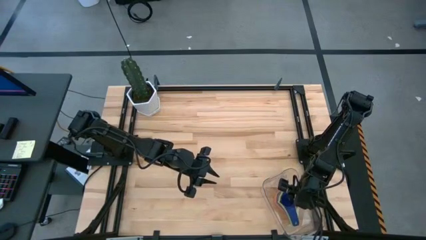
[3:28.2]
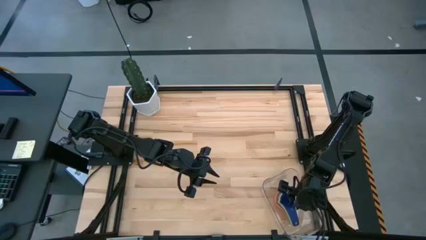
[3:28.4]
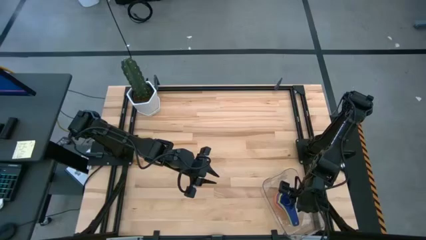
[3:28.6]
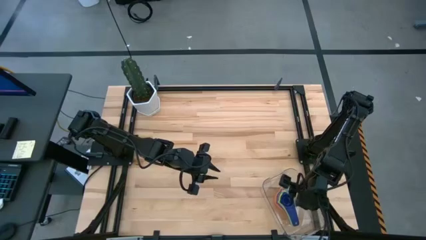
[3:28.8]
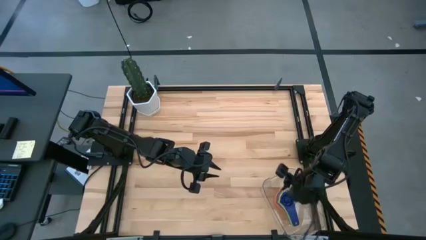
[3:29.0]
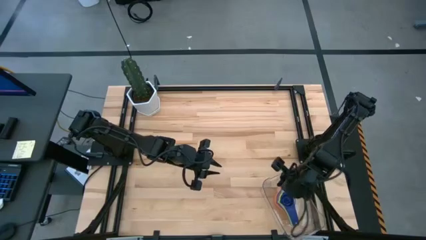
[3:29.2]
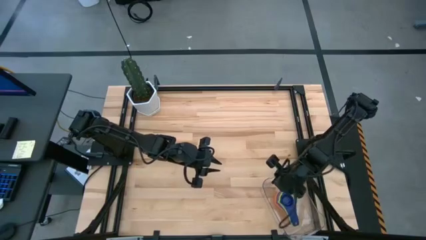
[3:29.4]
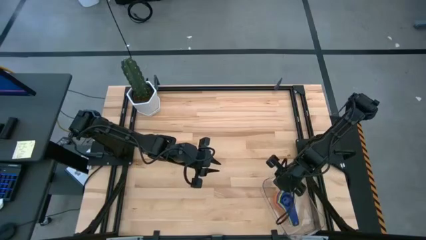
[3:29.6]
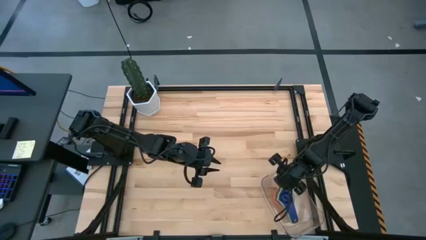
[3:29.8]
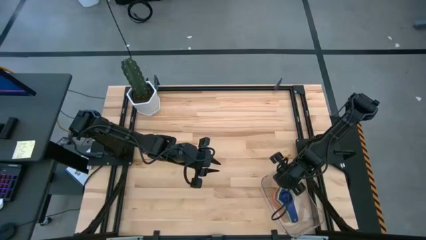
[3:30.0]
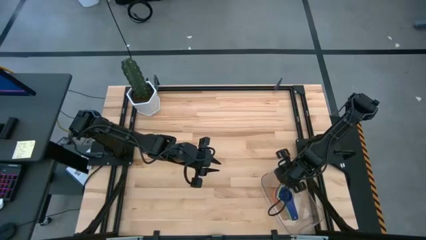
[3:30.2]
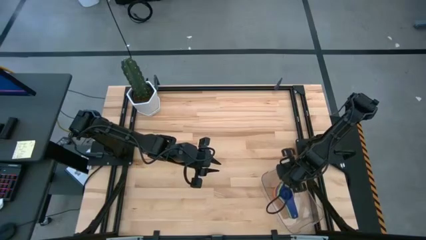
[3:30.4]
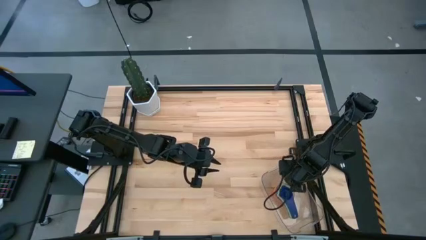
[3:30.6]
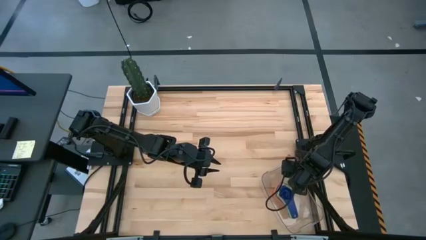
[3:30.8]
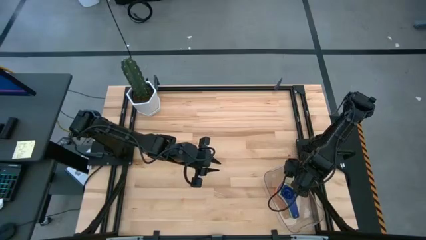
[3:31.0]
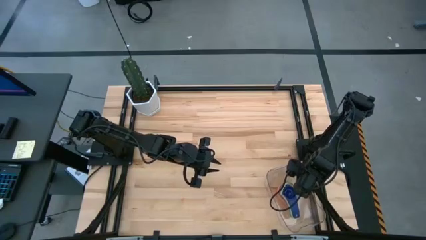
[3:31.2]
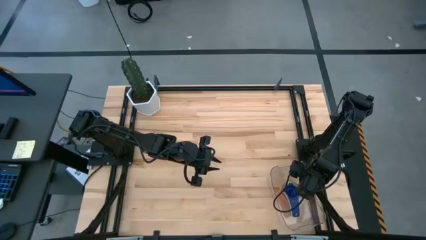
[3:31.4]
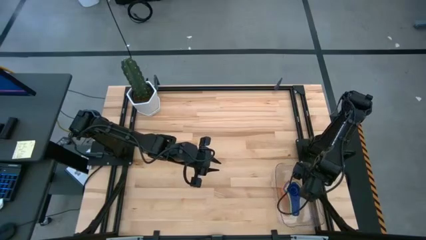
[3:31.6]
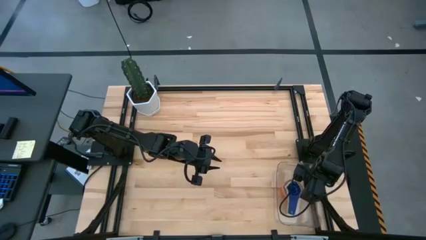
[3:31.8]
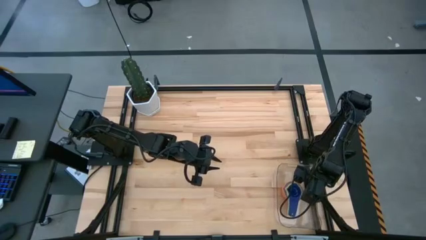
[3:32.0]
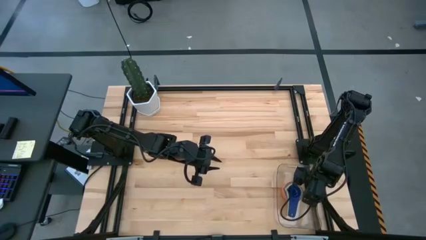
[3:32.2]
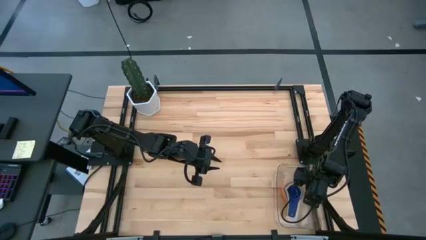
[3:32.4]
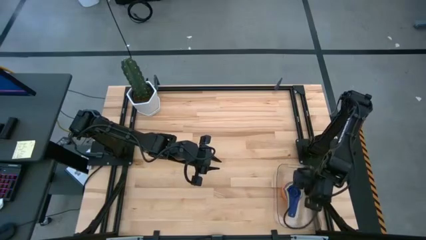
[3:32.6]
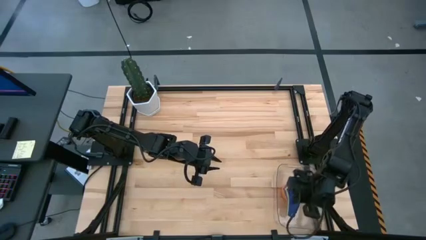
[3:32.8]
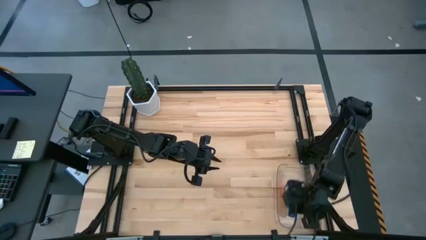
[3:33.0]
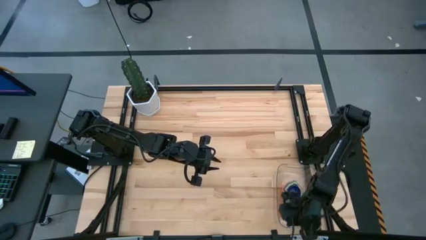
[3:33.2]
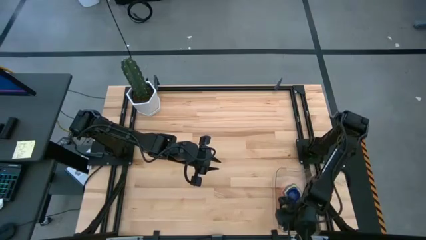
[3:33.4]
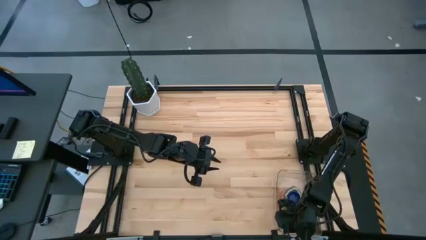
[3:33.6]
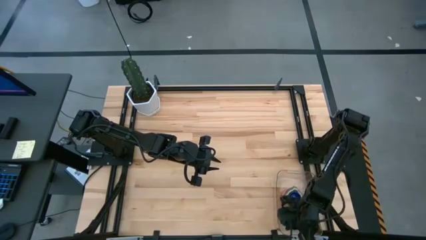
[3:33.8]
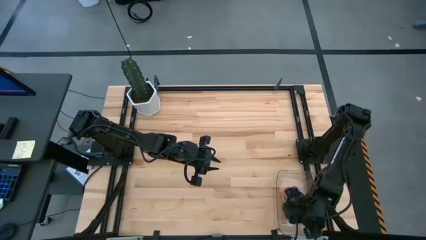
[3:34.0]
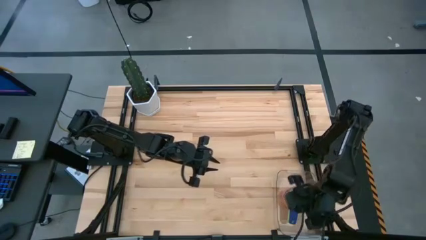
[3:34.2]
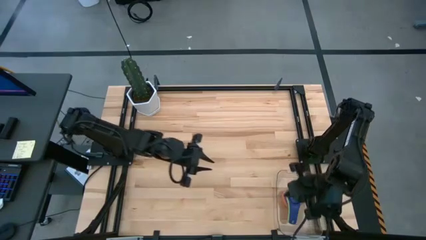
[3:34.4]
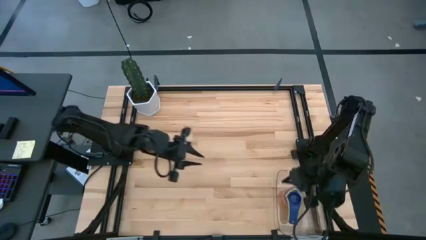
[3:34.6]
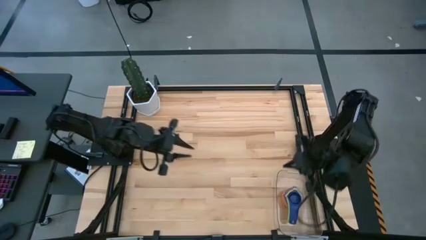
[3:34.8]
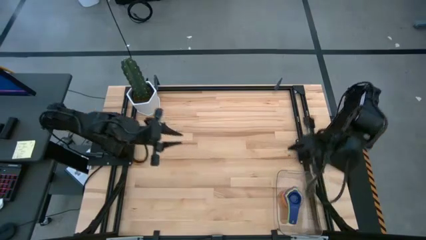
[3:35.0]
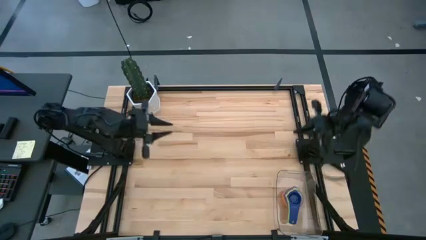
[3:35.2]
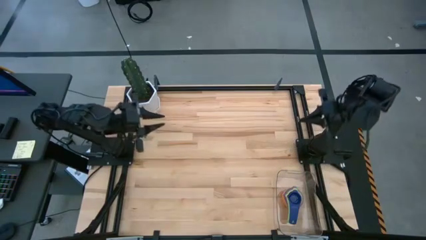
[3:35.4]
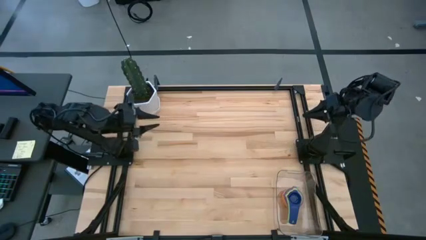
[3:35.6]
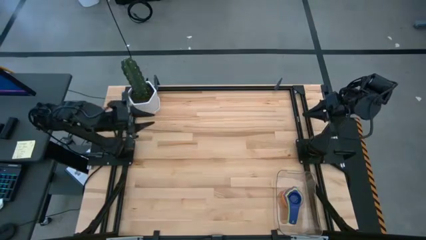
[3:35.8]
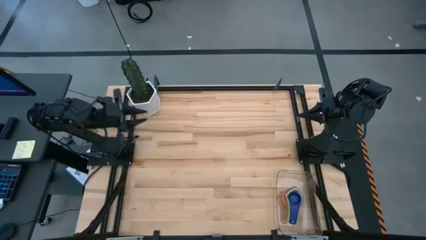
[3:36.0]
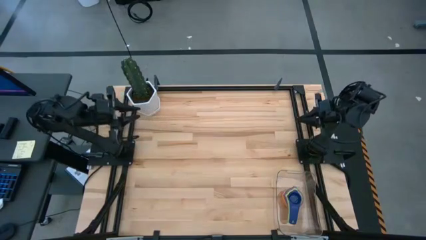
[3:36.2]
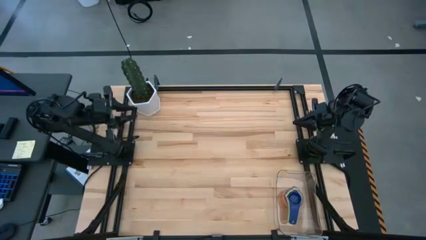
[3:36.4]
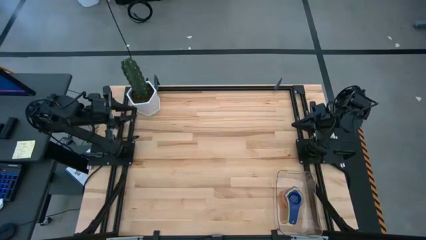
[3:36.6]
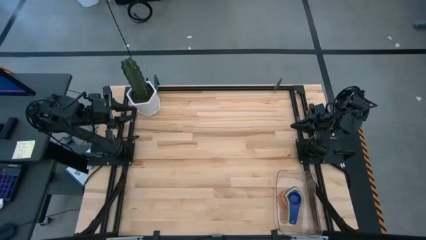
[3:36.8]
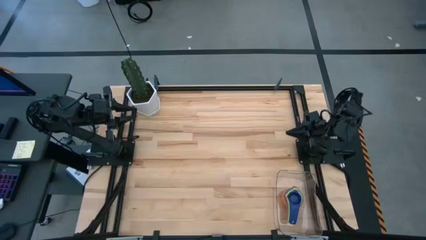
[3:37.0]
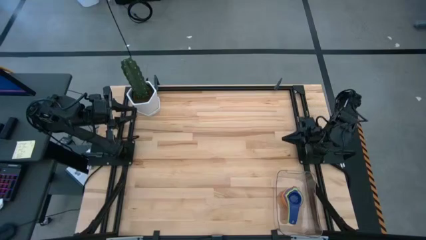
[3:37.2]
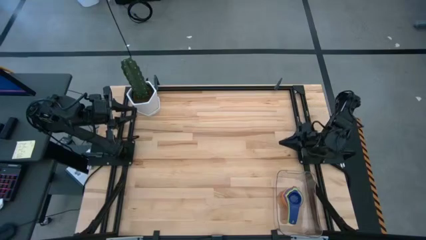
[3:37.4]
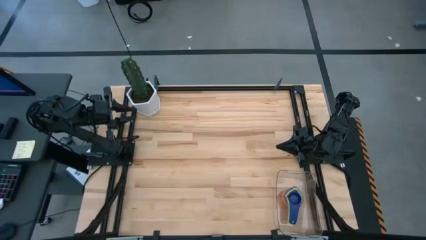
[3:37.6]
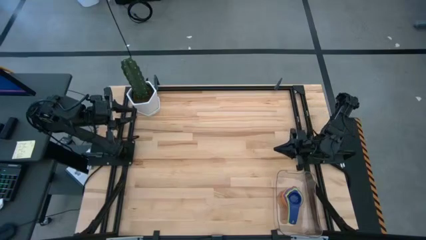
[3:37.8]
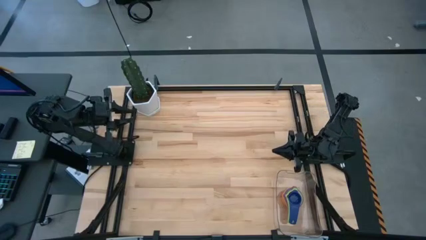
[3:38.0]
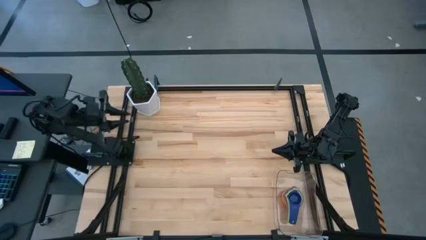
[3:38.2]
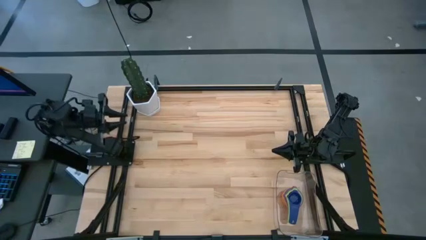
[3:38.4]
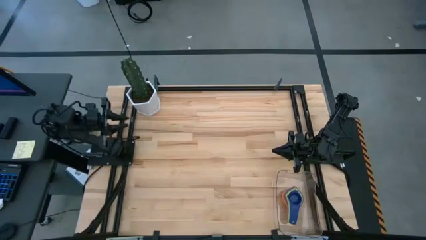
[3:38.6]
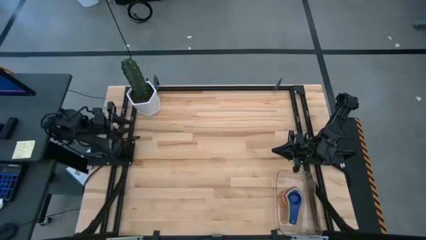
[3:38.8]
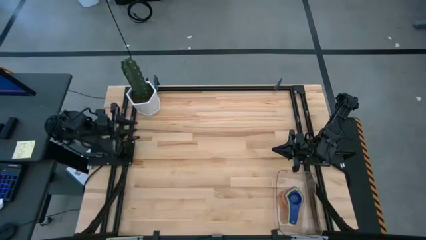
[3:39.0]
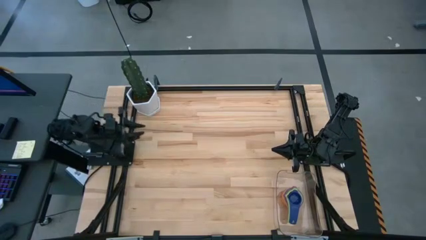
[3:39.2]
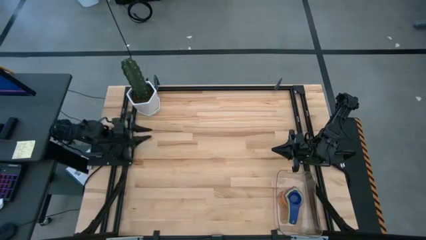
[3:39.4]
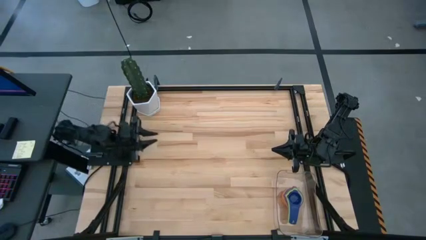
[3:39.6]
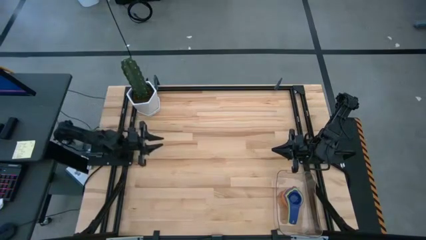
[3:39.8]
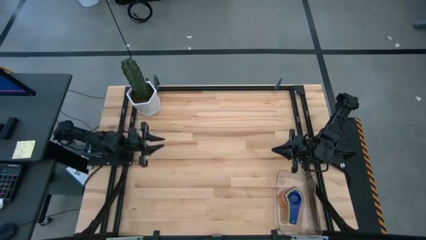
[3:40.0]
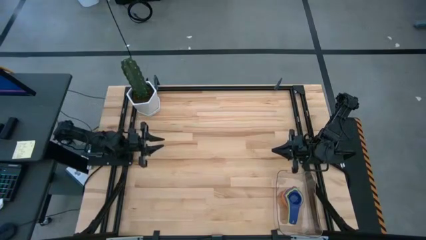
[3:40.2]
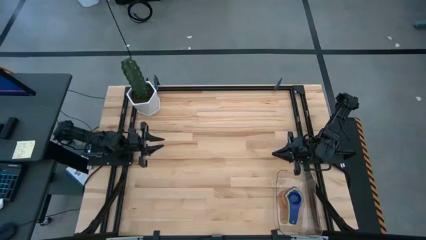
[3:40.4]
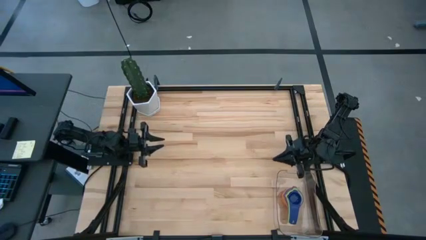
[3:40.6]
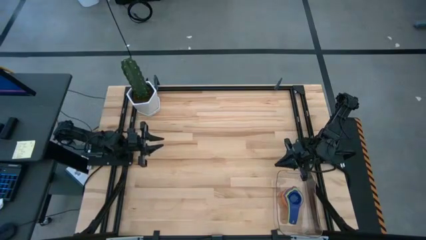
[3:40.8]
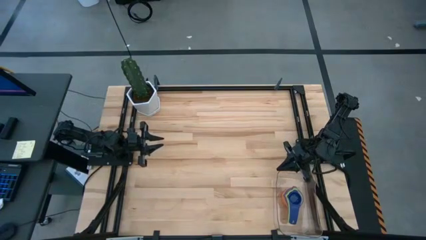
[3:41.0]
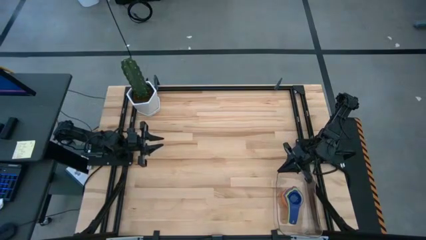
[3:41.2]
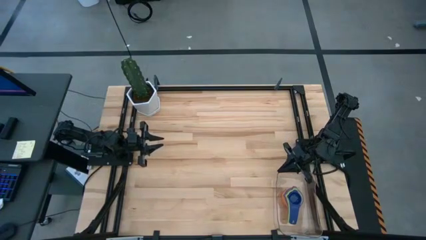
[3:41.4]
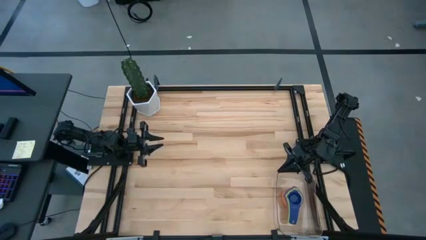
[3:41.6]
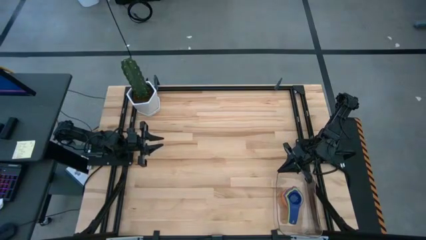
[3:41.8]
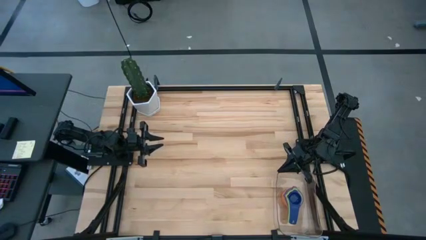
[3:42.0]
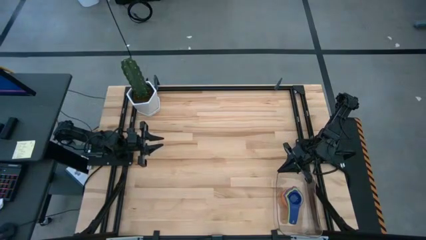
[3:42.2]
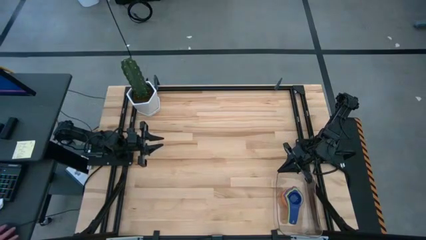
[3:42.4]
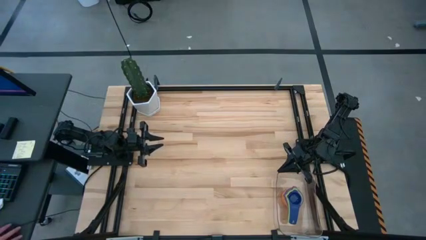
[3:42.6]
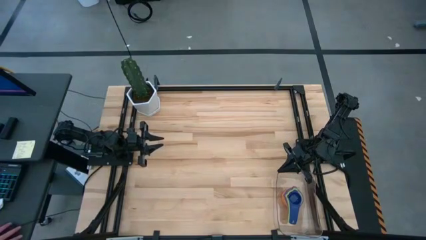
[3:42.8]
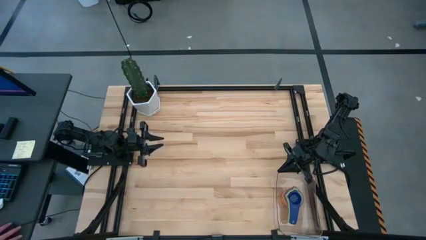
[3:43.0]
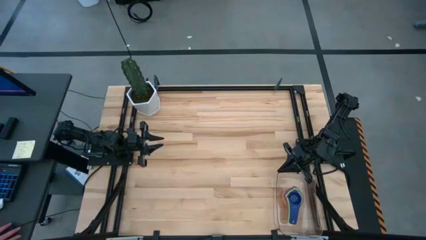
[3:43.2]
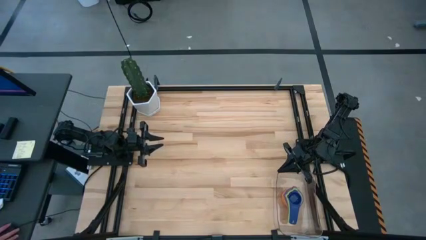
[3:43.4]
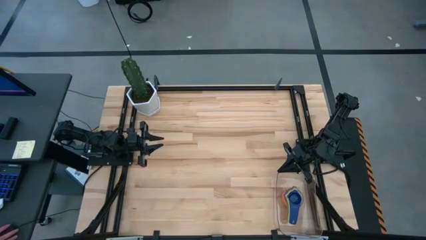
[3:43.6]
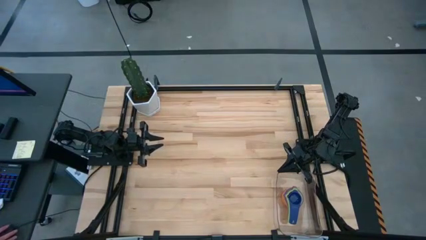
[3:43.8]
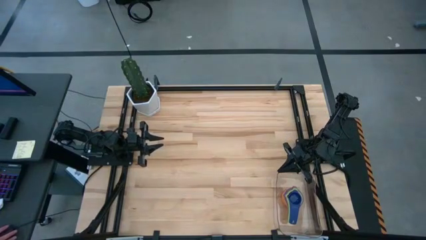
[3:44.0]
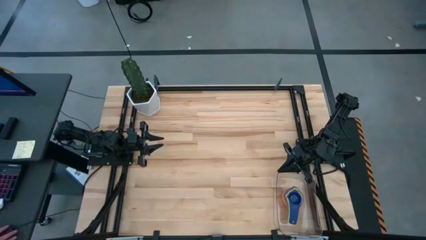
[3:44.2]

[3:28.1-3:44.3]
Task: Nest measuring cups in basket
Return to Home Position
